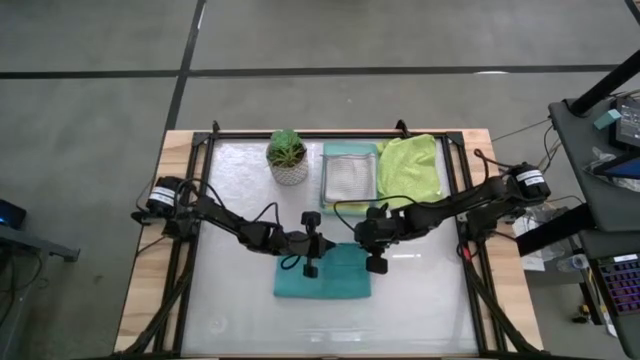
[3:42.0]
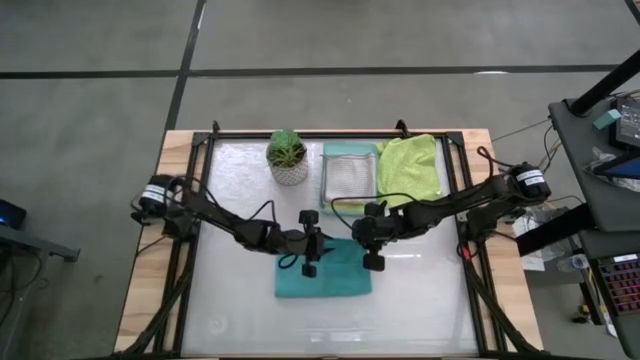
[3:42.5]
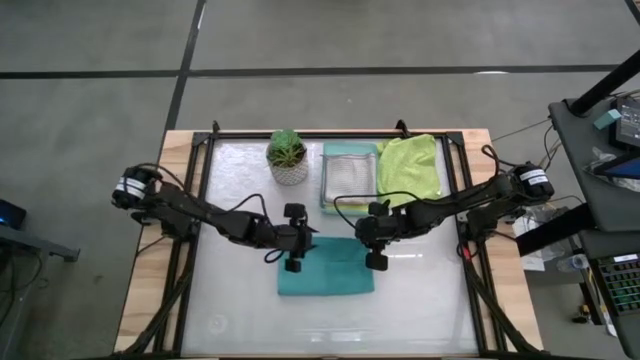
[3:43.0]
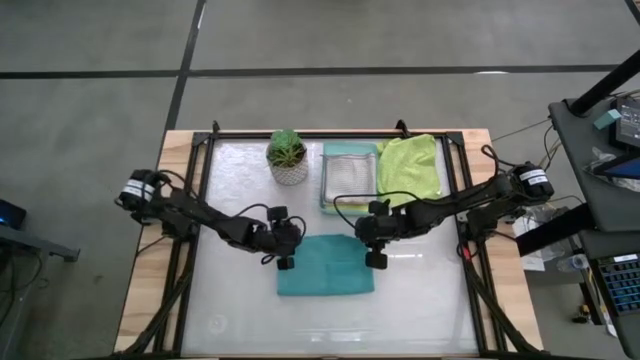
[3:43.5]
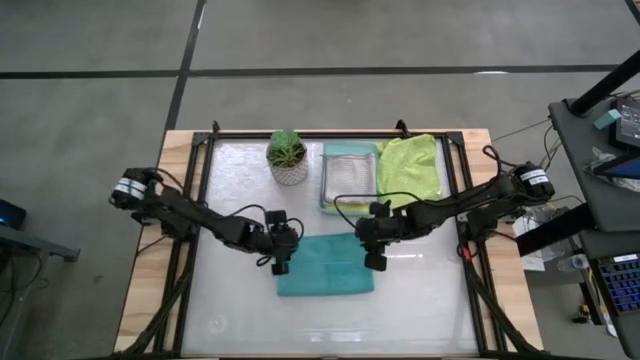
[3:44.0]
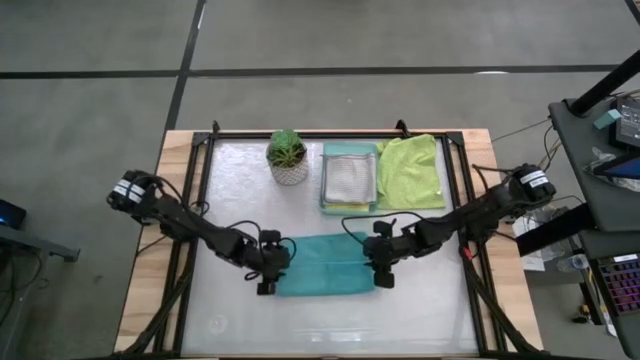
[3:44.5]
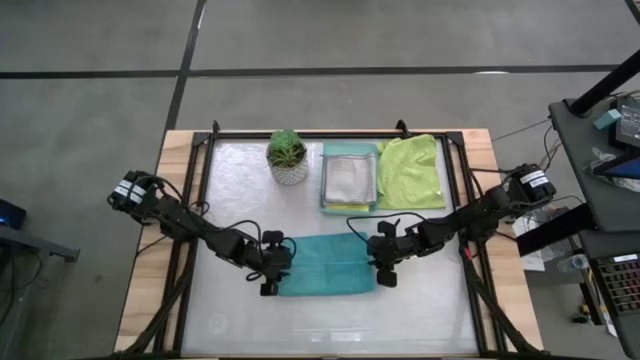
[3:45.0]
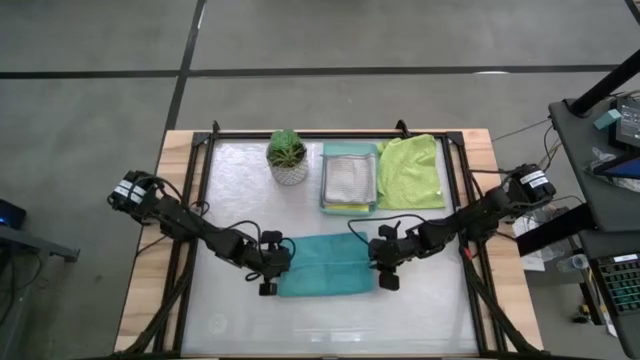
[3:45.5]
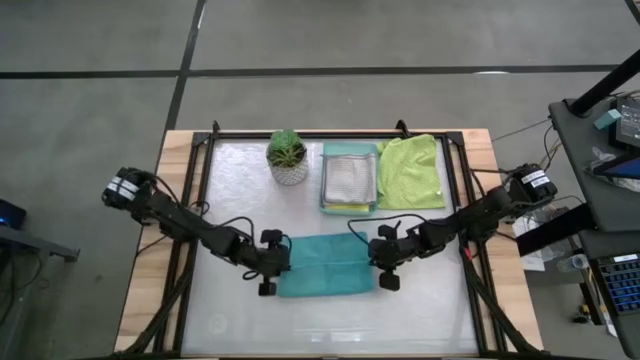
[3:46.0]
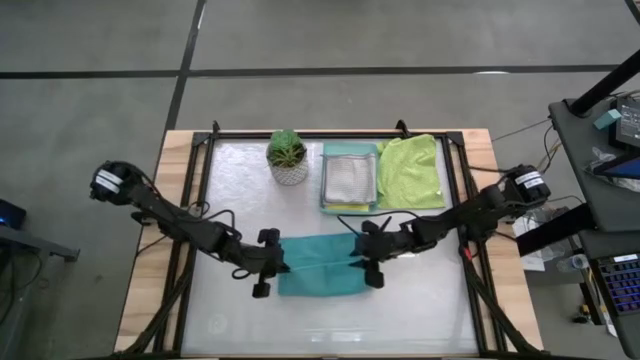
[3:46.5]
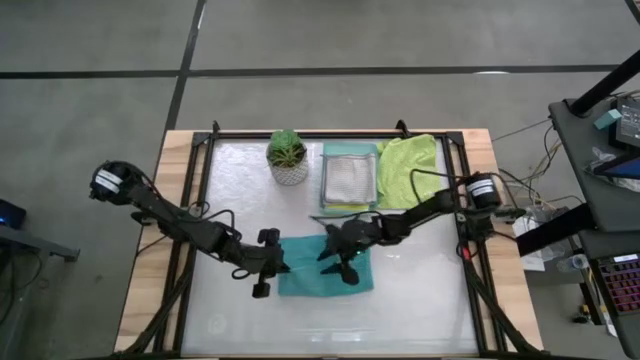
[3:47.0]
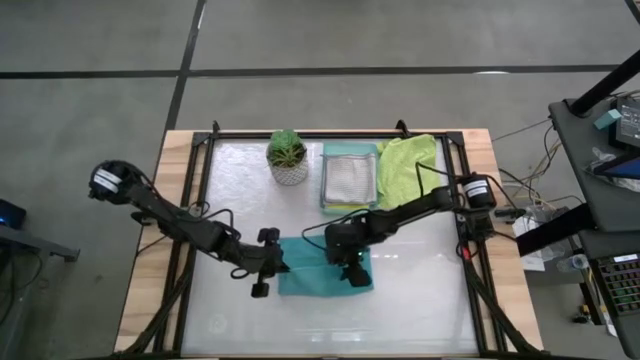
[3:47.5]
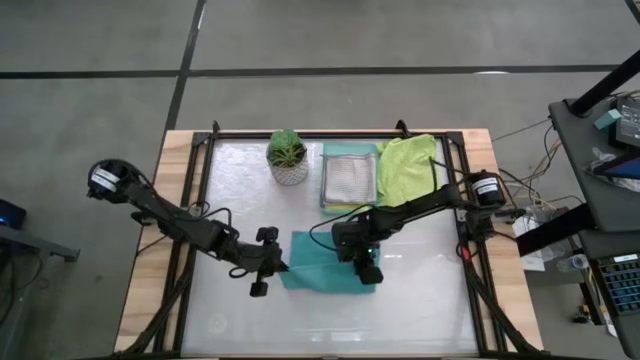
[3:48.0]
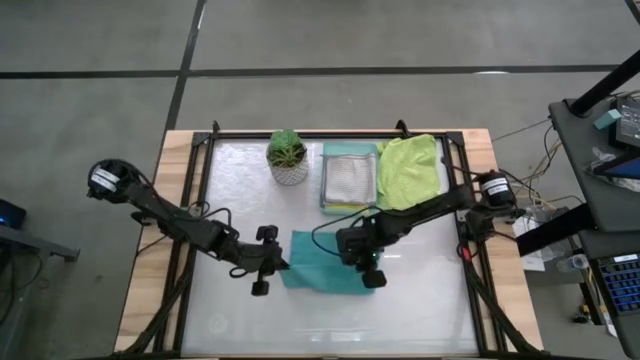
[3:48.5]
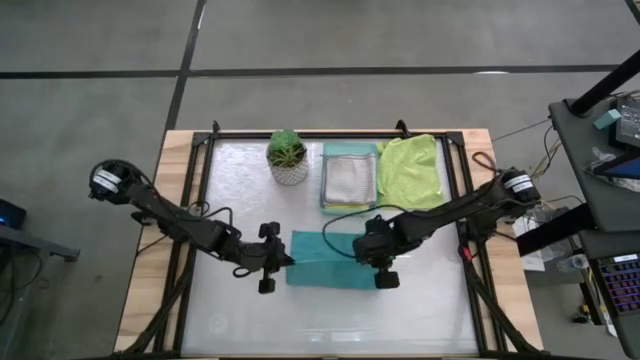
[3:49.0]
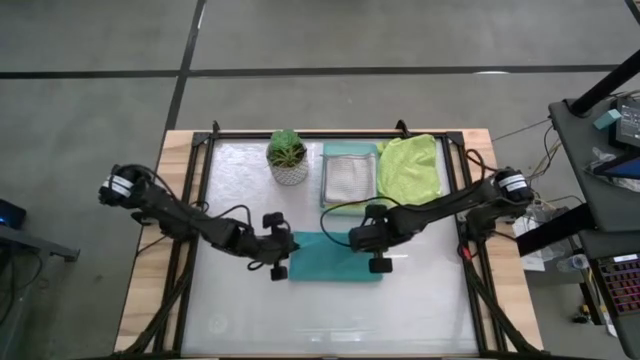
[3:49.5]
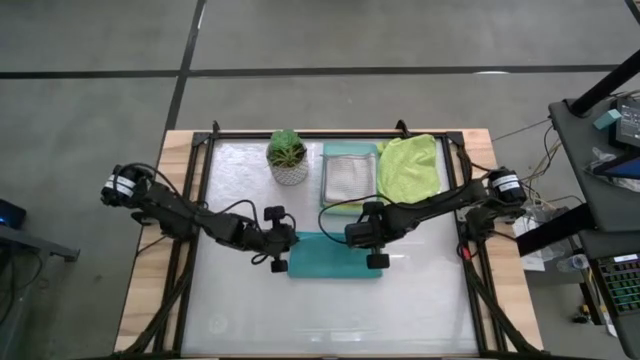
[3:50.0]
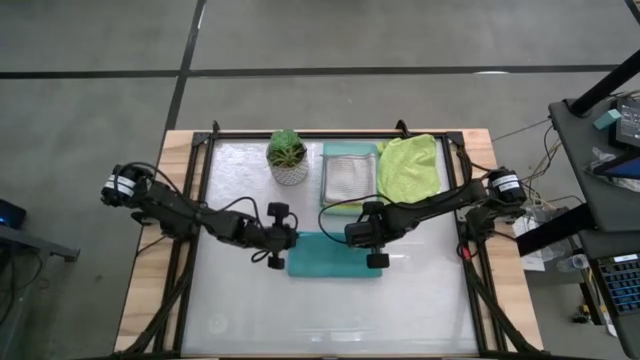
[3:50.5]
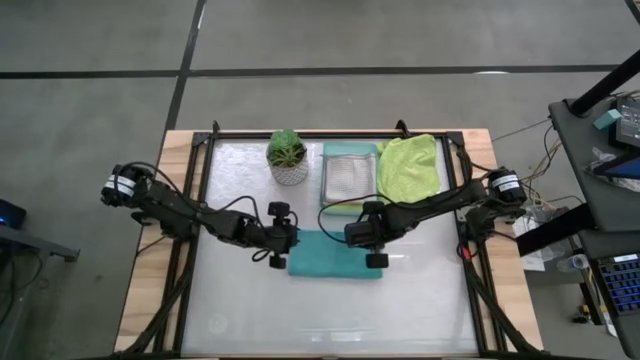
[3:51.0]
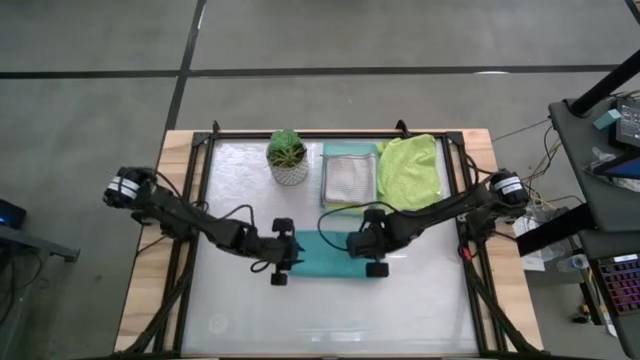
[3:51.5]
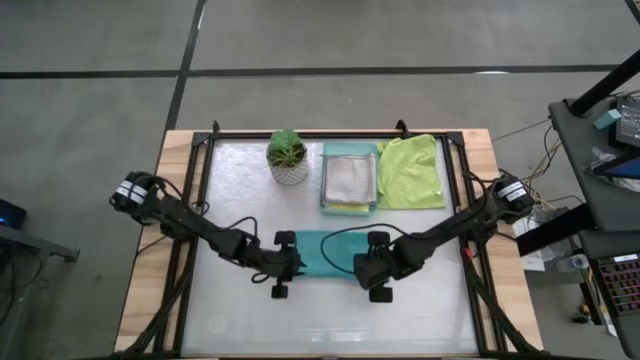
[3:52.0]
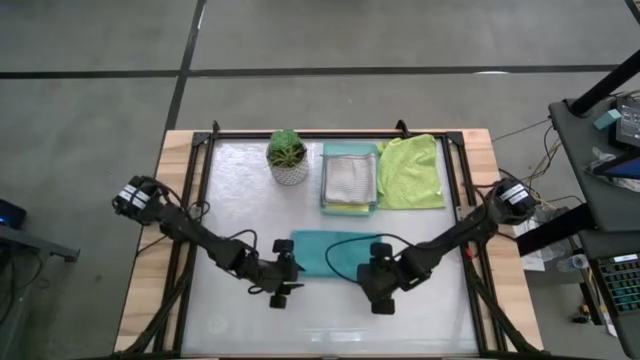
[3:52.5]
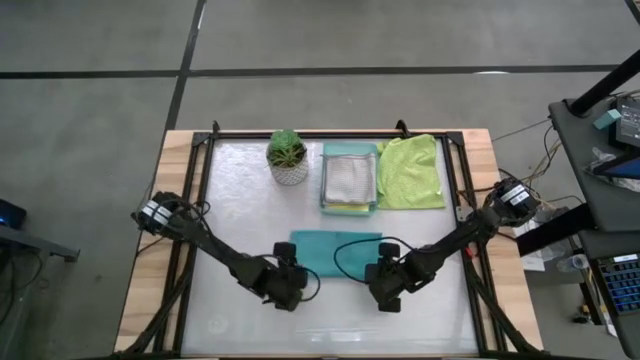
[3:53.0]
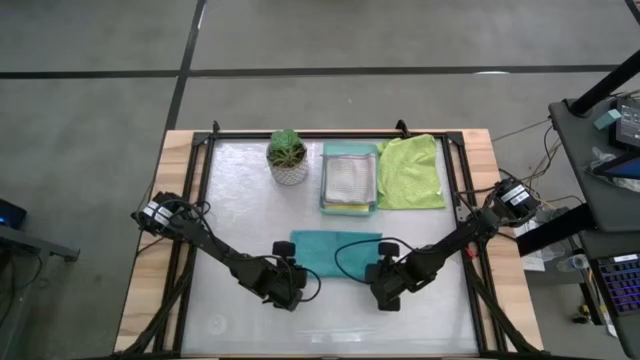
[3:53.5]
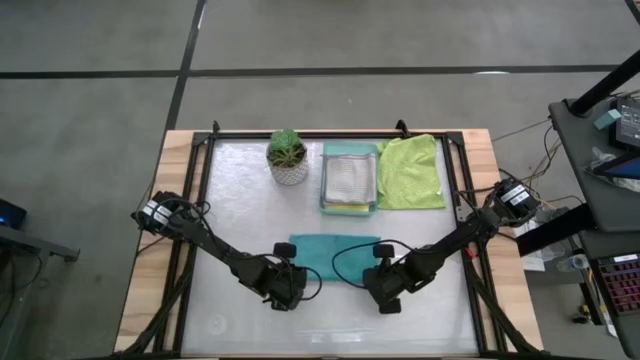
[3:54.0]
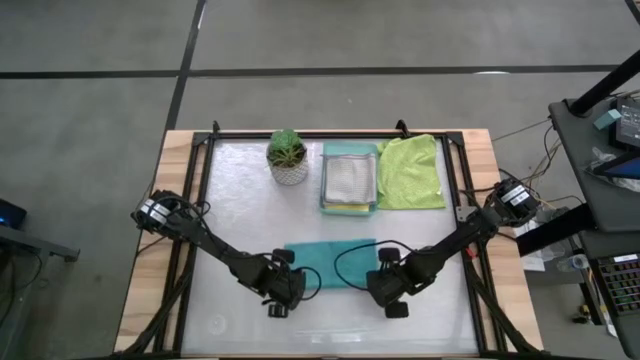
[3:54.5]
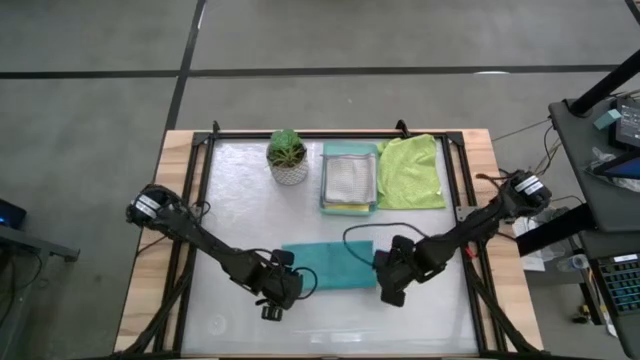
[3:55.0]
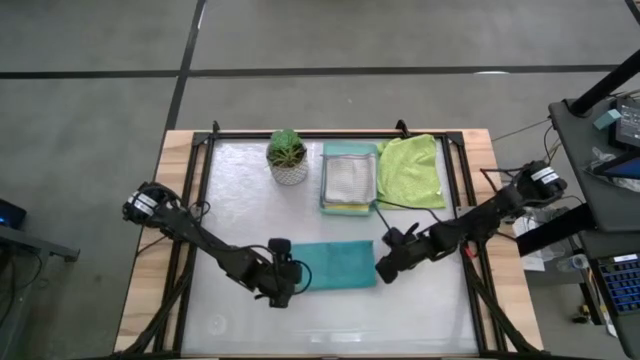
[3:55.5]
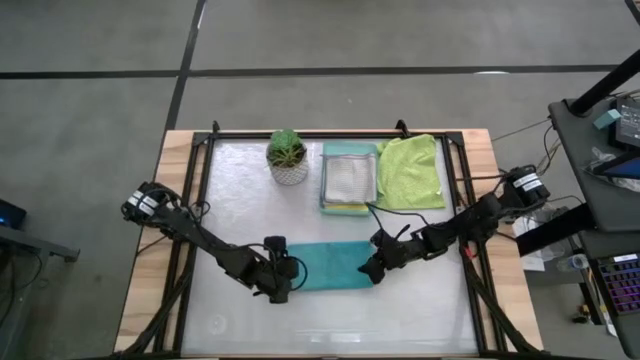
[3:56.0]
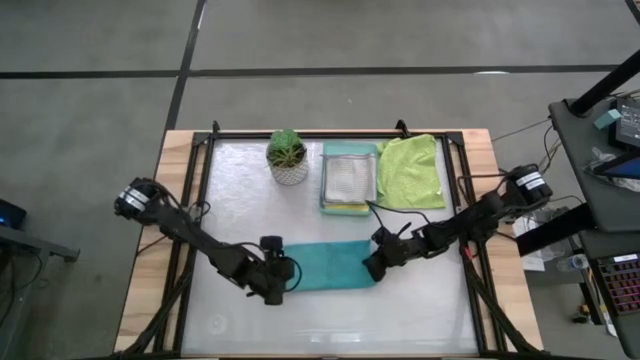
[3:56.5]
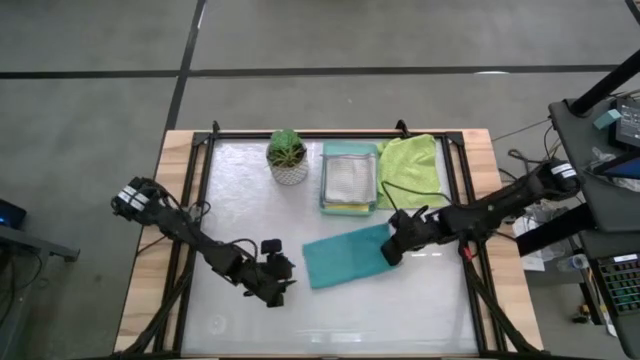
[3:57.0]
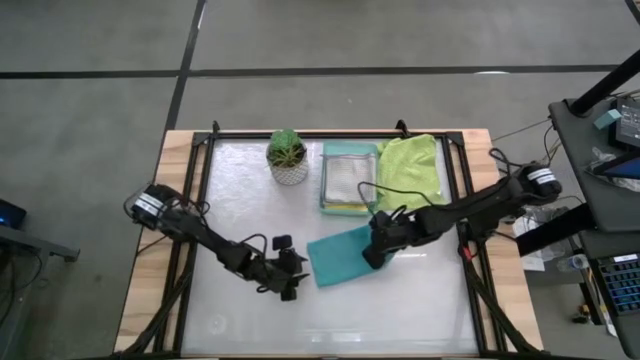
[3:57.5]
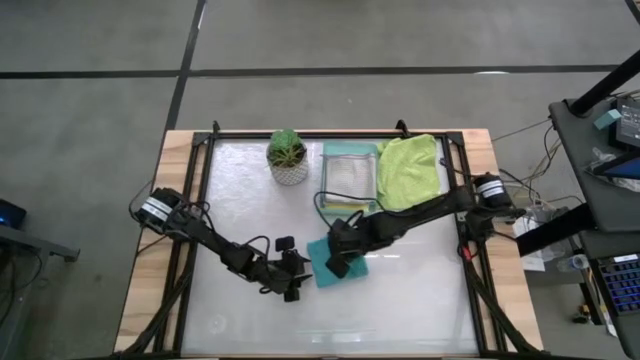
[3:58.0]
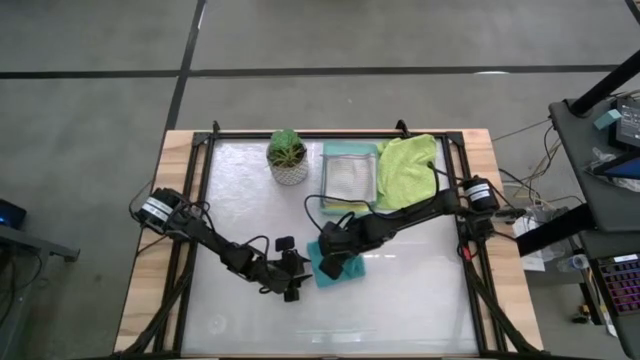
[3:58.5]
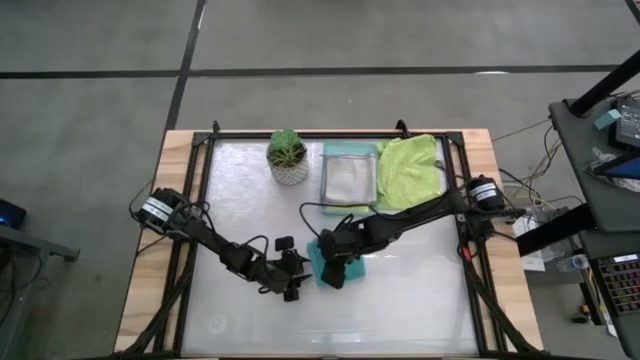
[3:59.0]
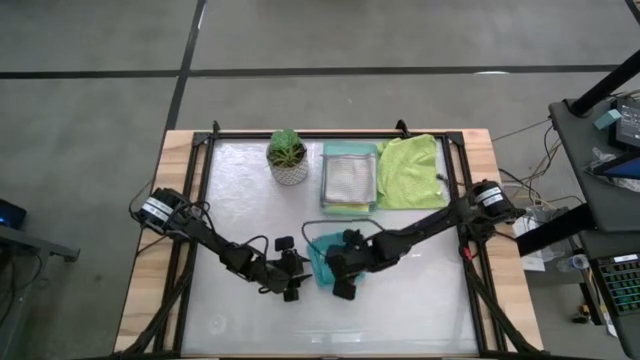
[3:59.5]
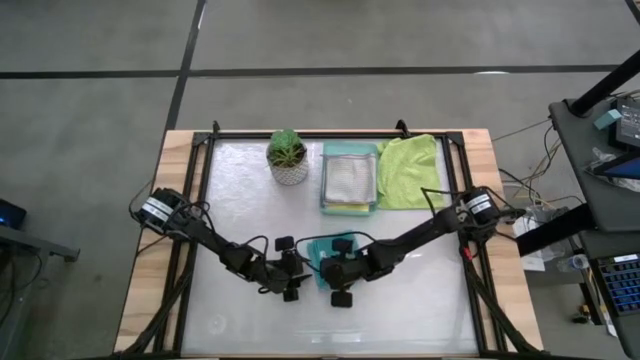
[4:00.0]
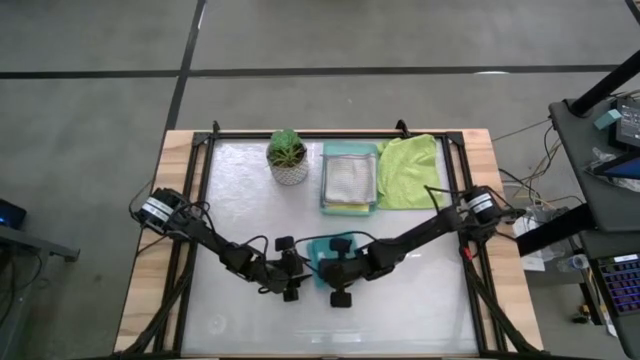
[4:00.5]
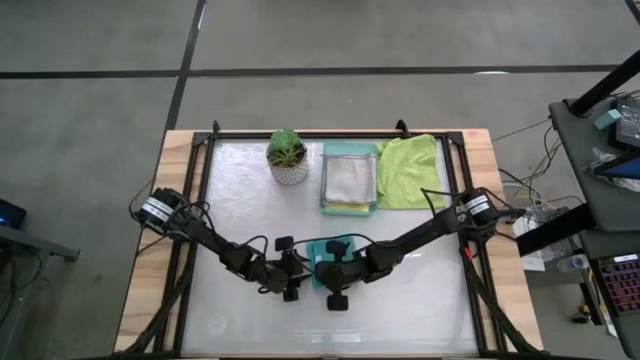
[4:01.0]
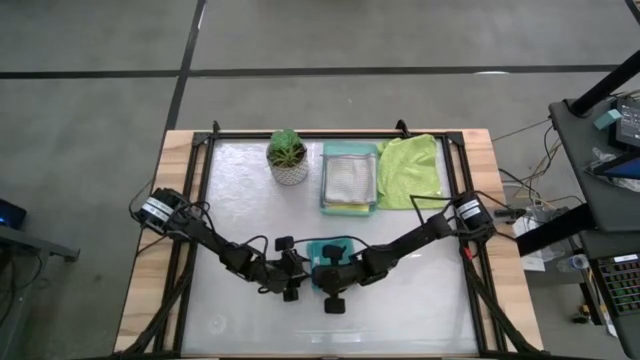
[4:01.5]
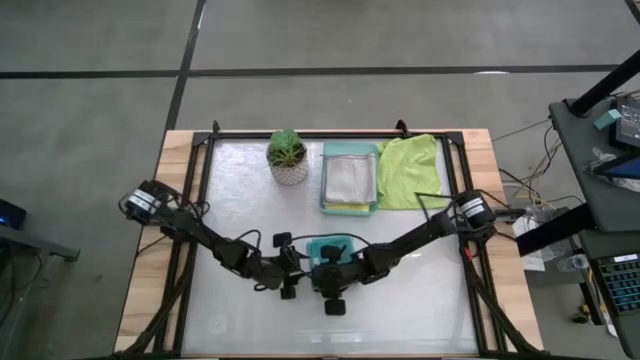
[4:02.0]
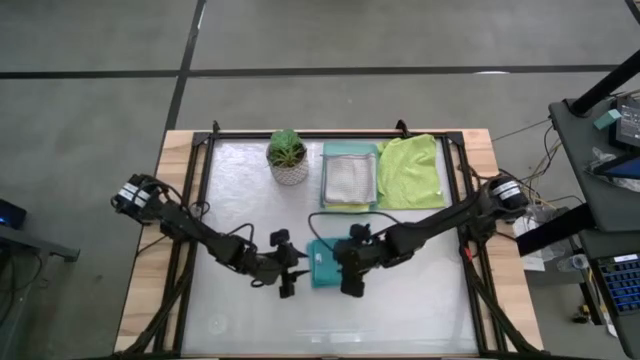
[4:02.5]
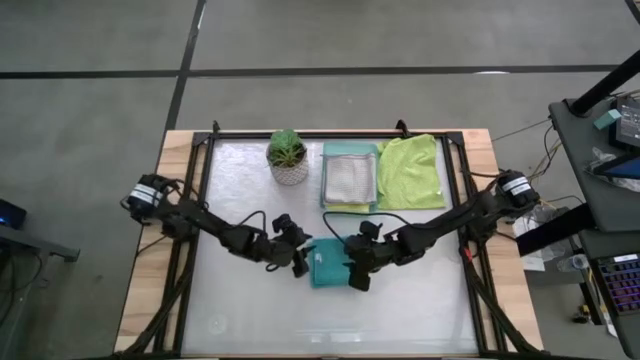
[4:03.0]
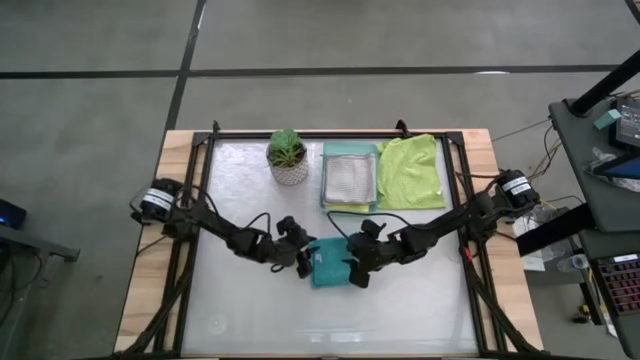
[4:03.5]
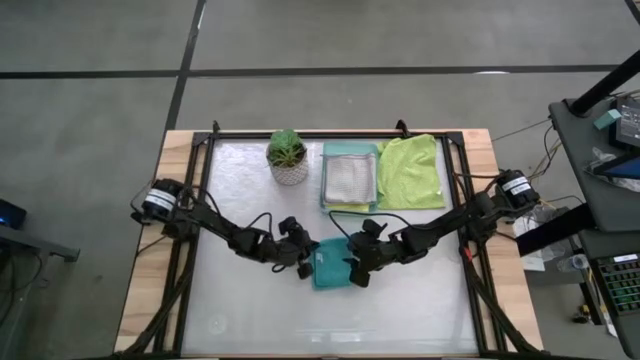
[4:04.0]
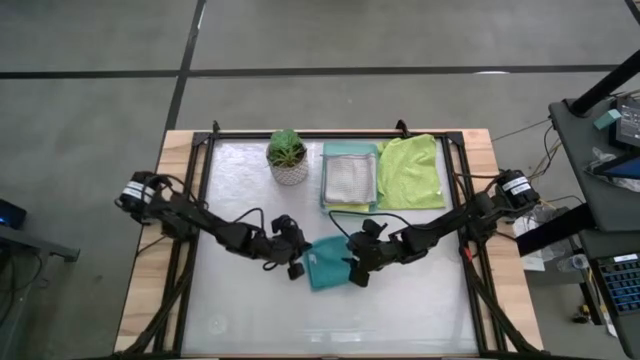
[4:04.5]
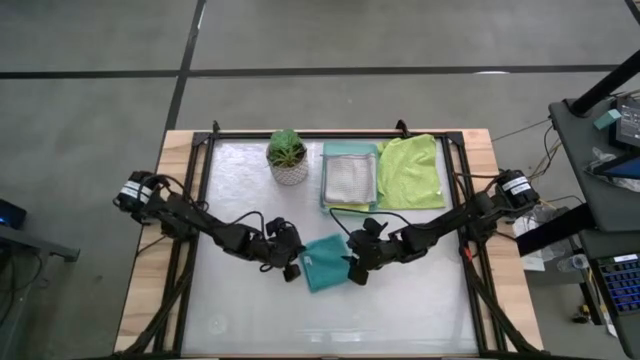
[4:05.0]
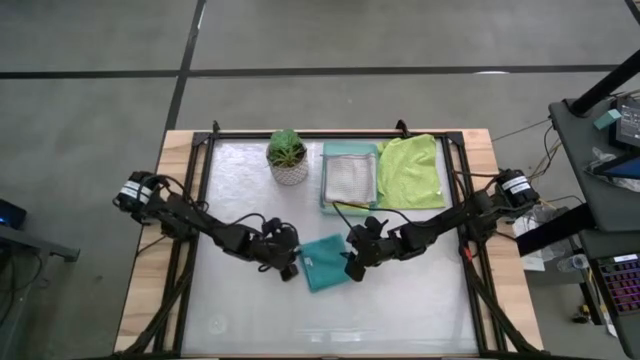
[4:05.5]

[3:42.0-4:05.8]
Task: Fold microfiber towels
Fold the blue microfiber cloth
